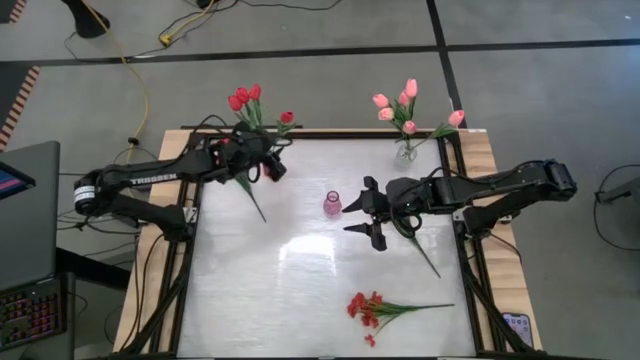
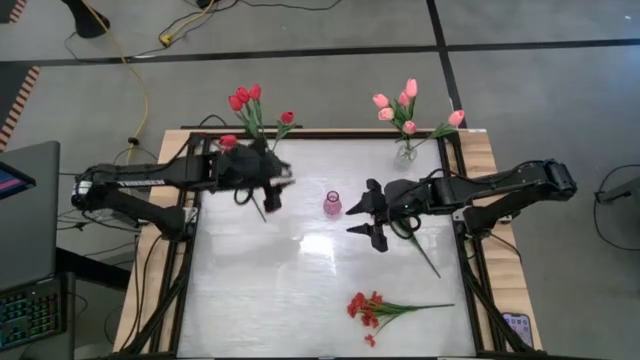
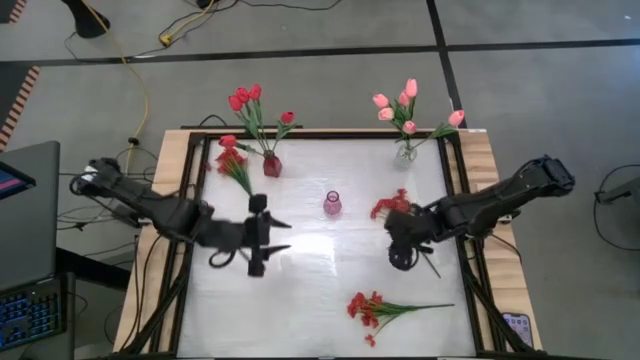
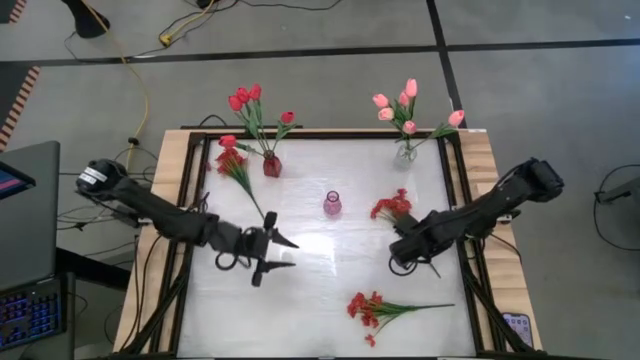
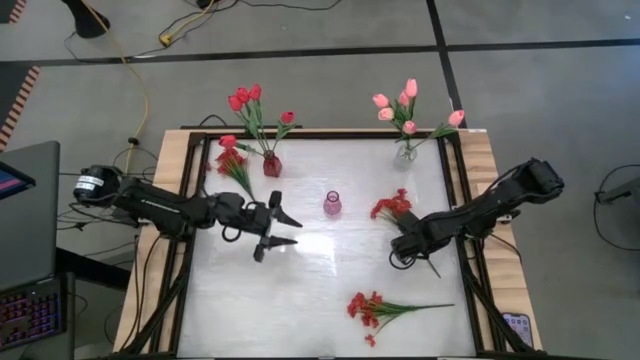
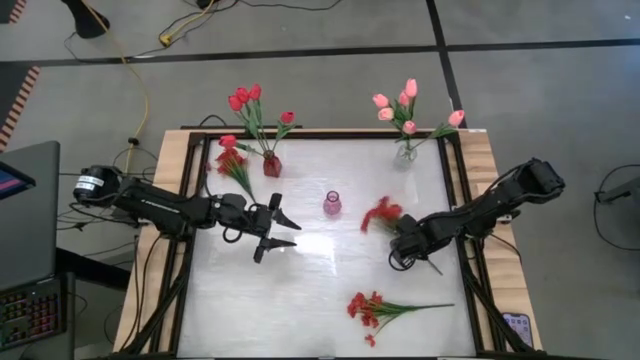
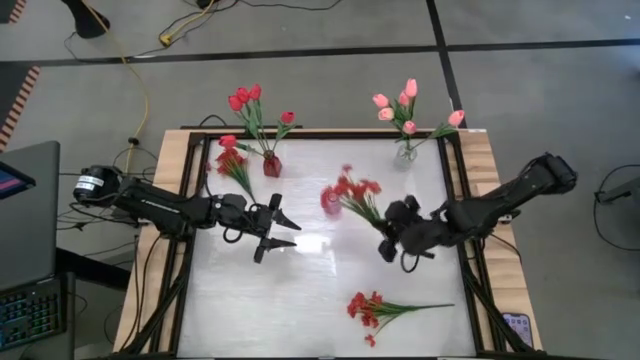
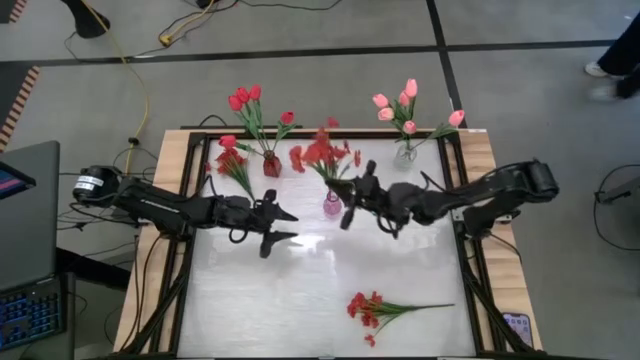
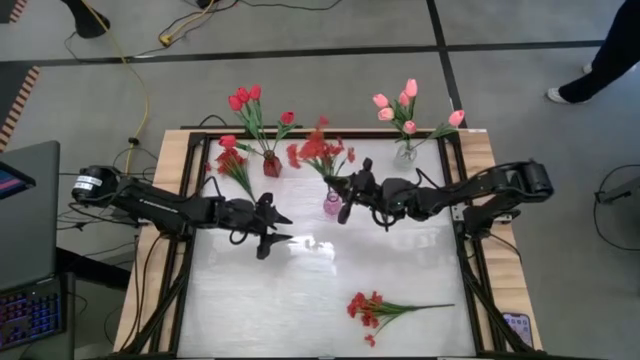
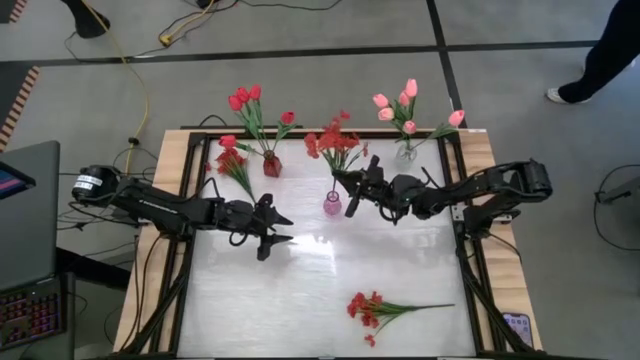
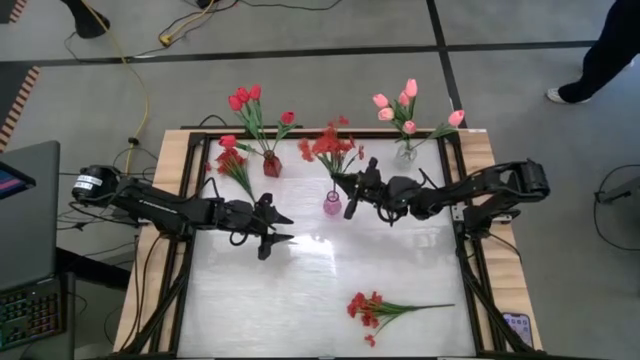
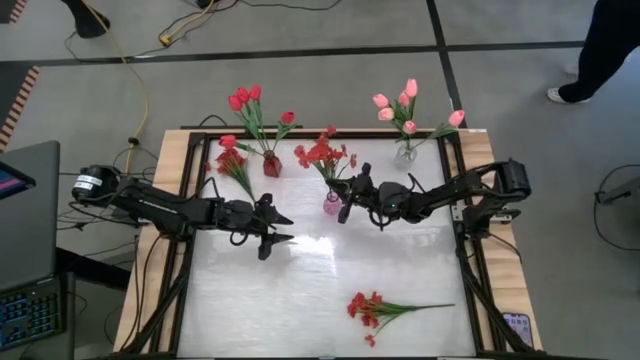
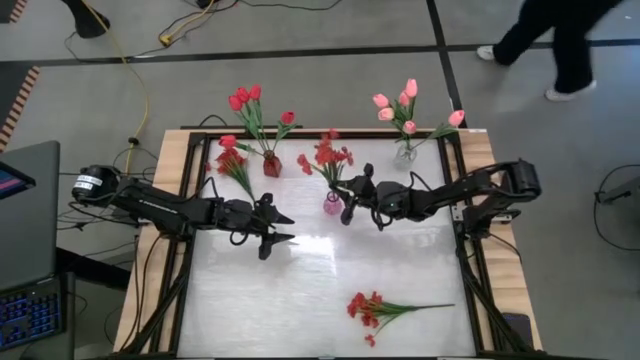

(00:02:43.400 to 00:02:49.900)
Task: Sort flowers into vase by color
Put the orange flowers into the purple vase

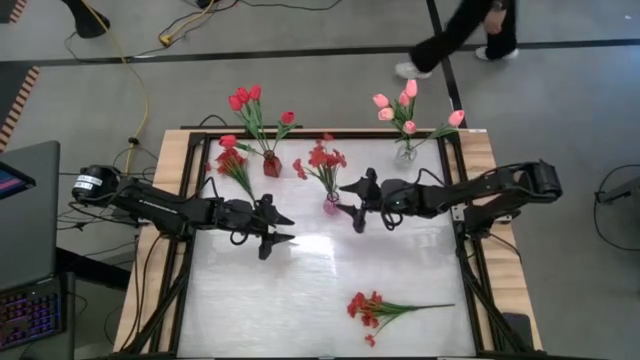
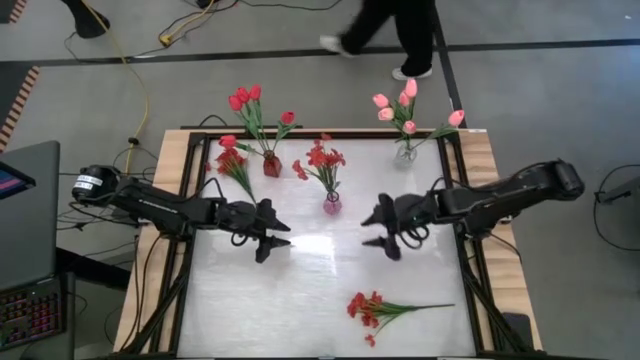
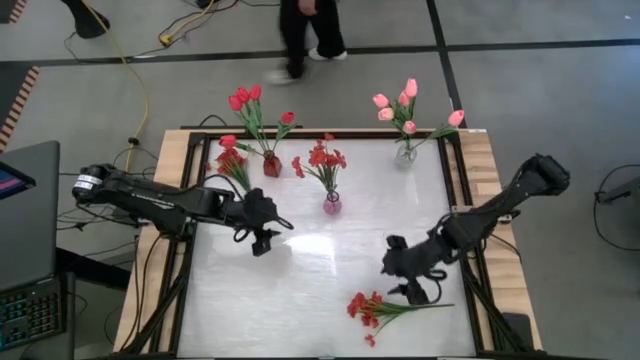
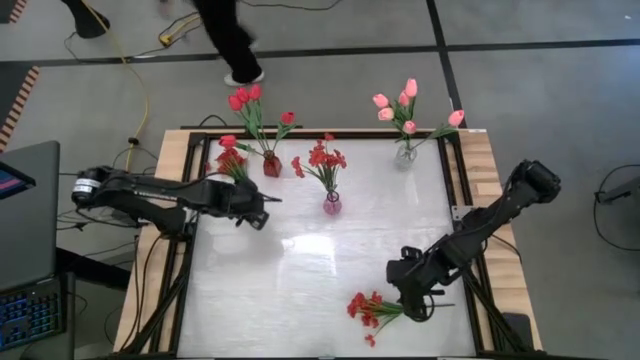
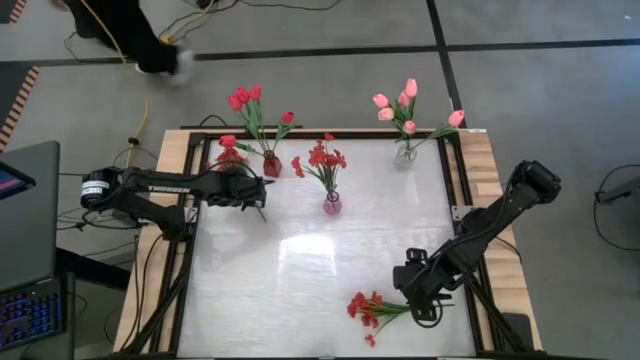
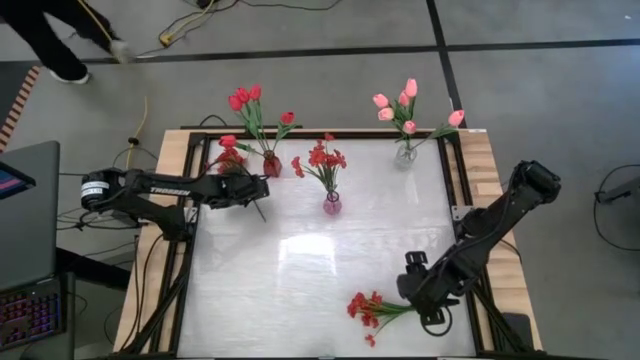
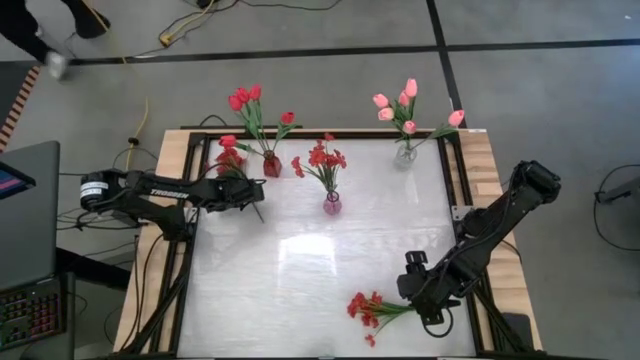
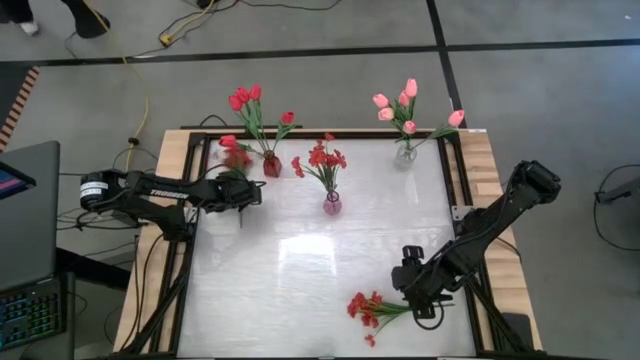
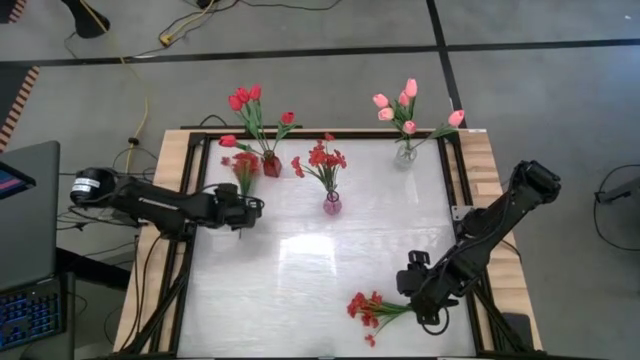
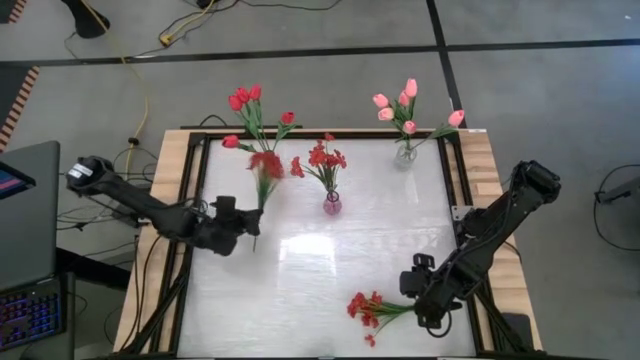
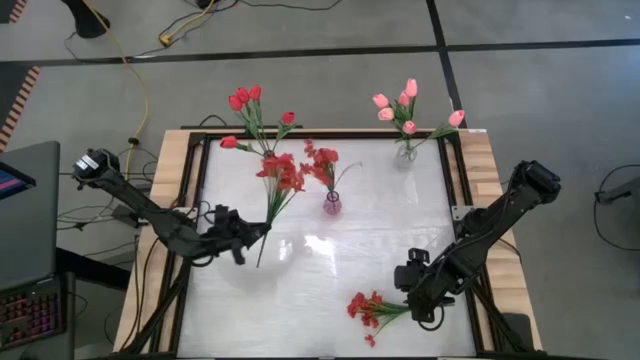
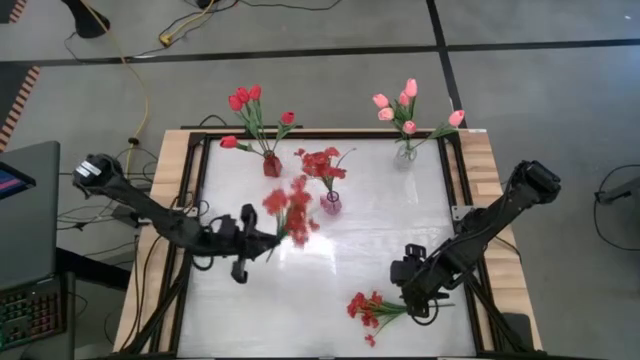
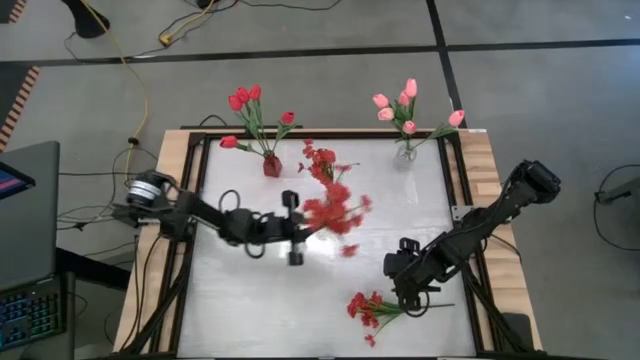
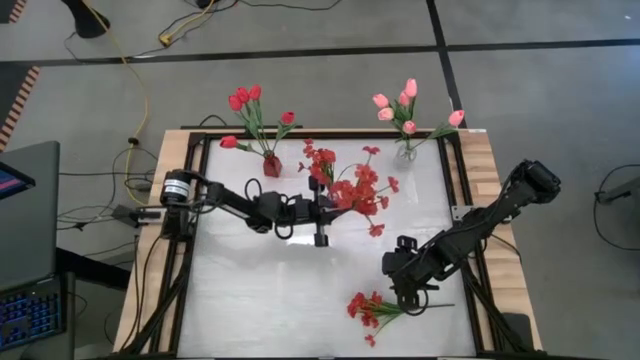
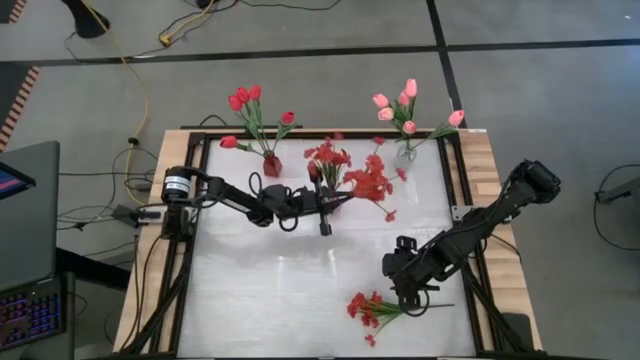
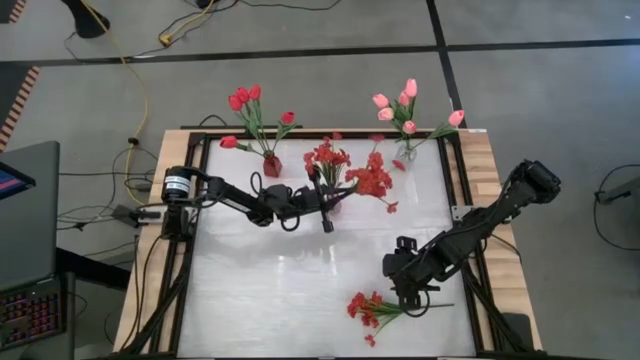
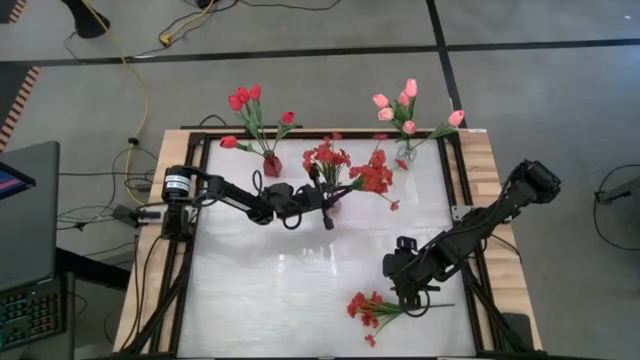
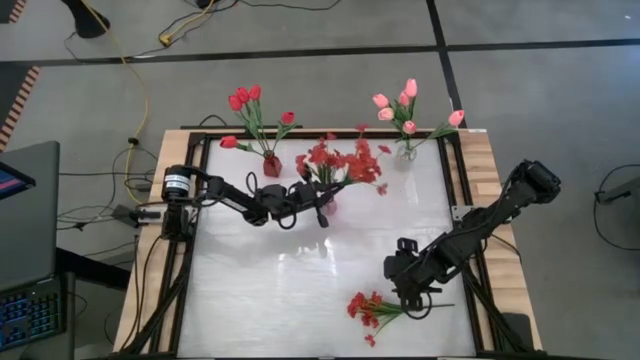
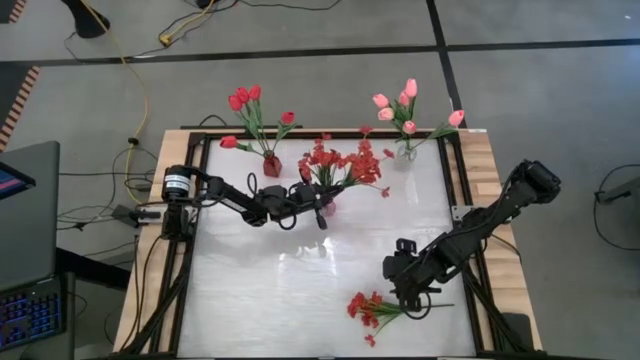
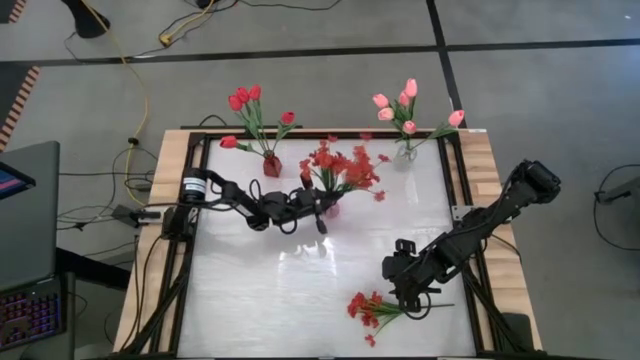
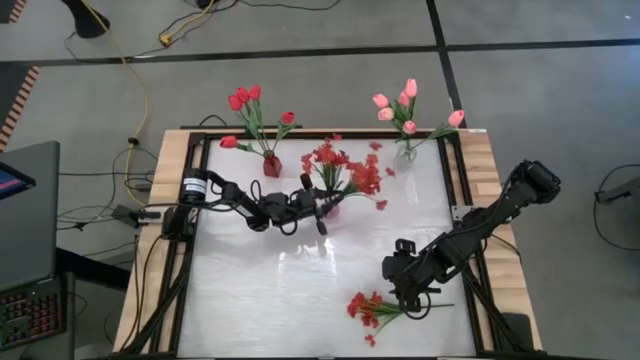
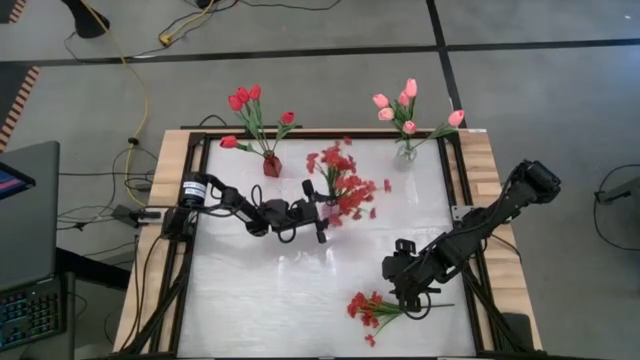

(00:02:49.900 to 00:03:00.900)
Put the orange flowers into the purple vase

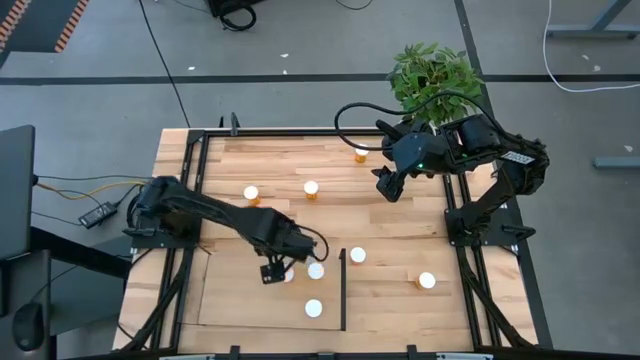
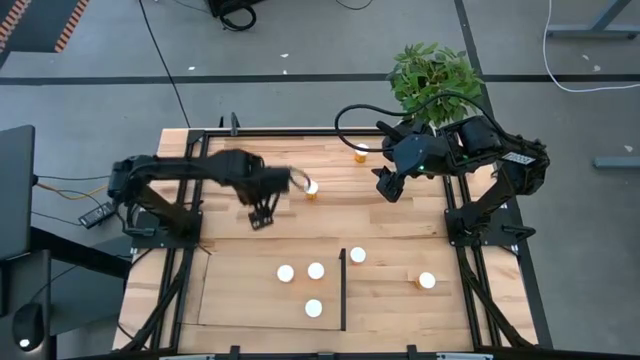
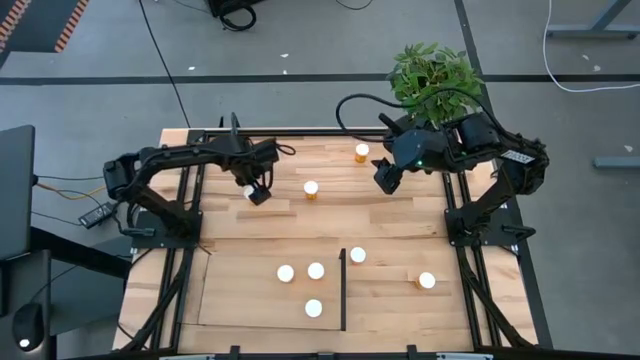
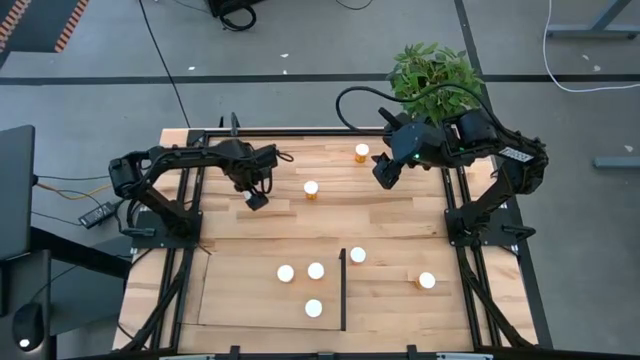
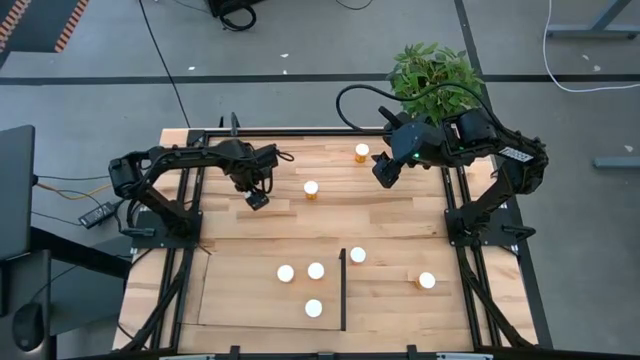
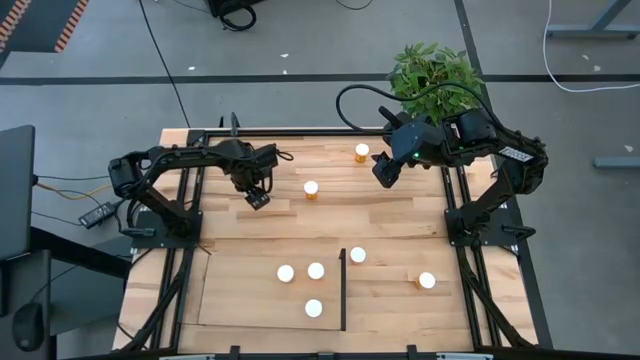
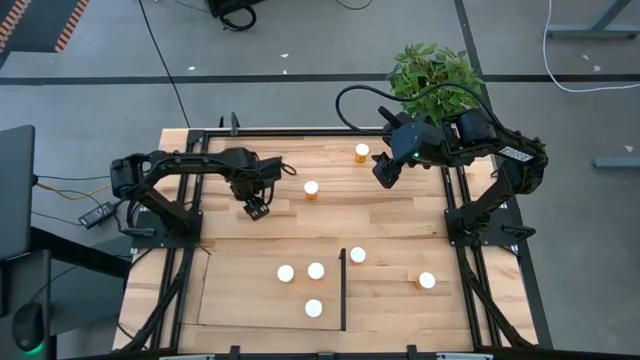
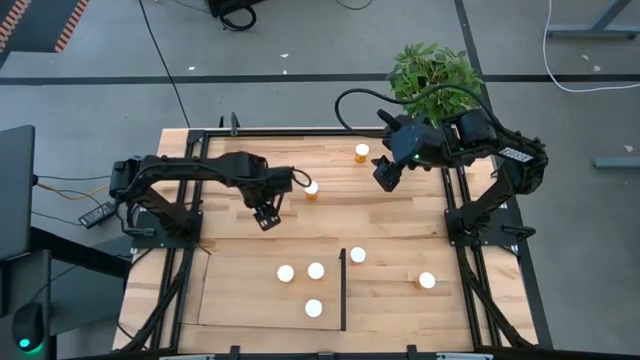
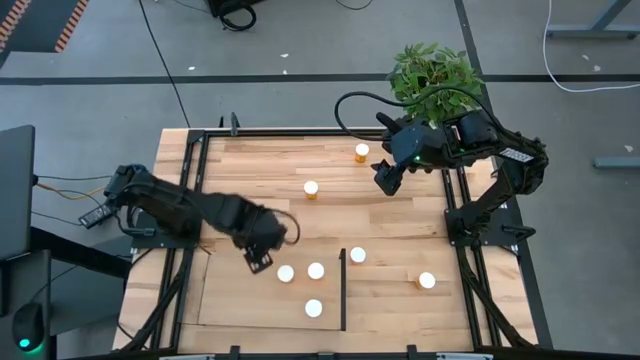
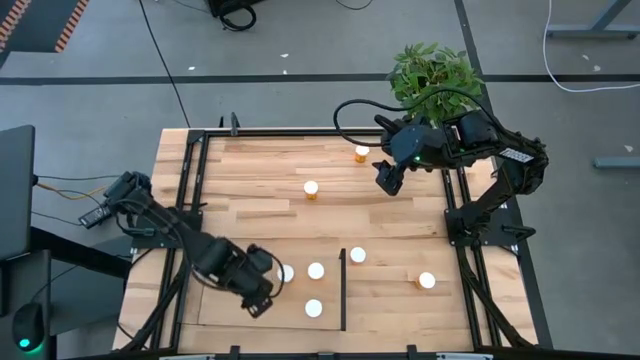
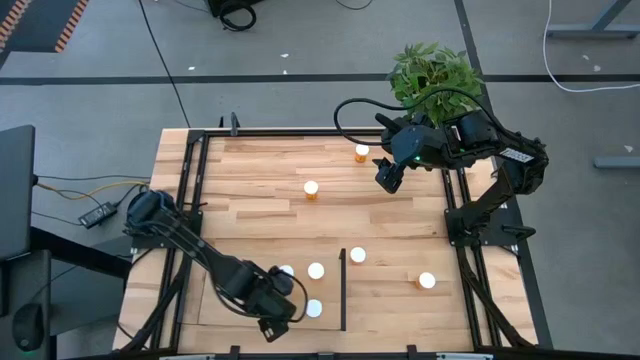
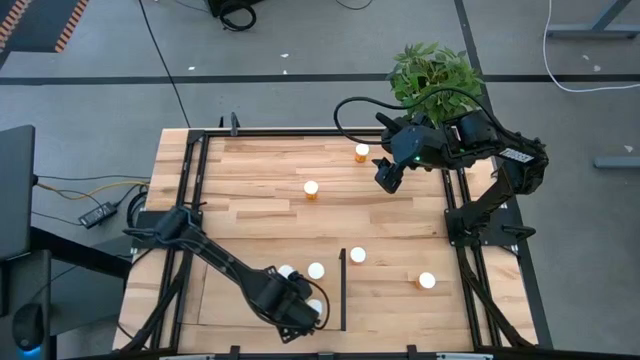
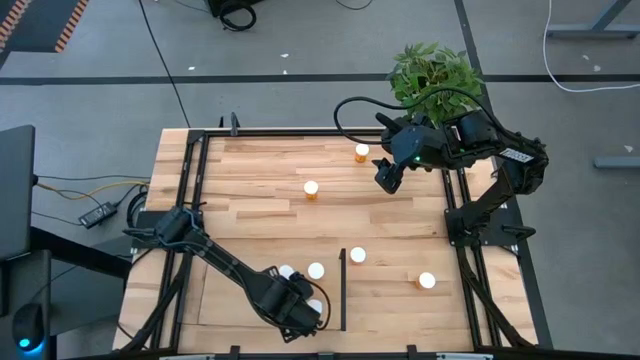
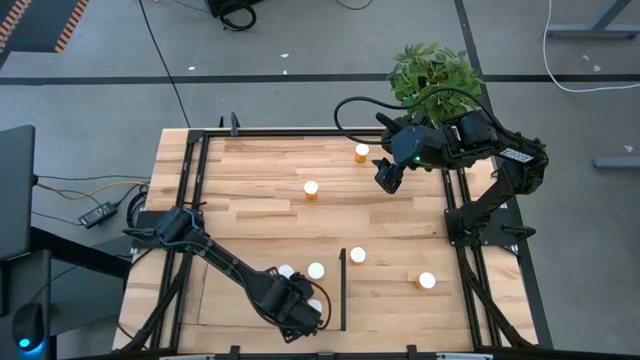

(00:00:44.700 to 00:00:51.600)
Task: Pick and place medicine bottles onto shelf by color
Align the orange pill bottle with the other orange pill bottle on the shelf
